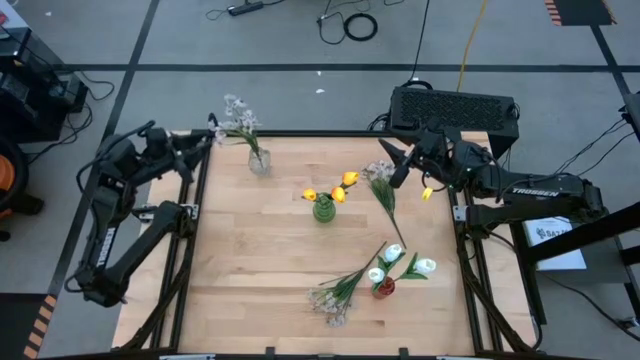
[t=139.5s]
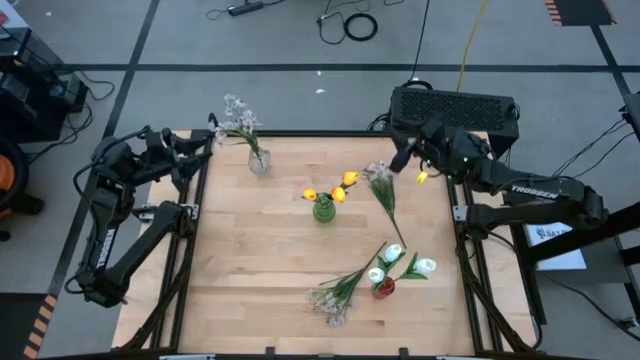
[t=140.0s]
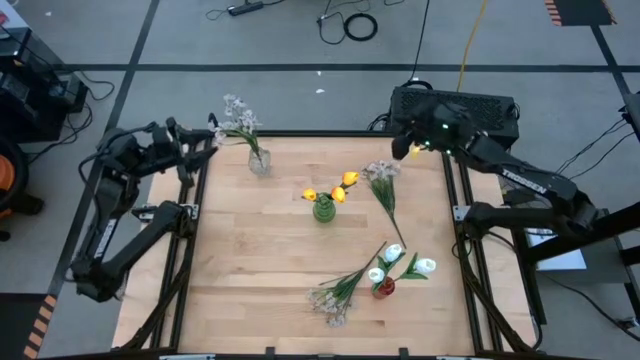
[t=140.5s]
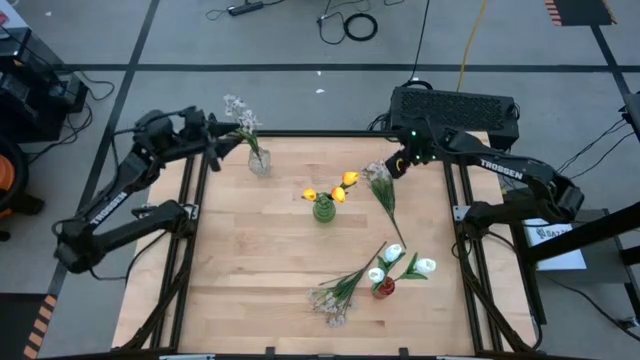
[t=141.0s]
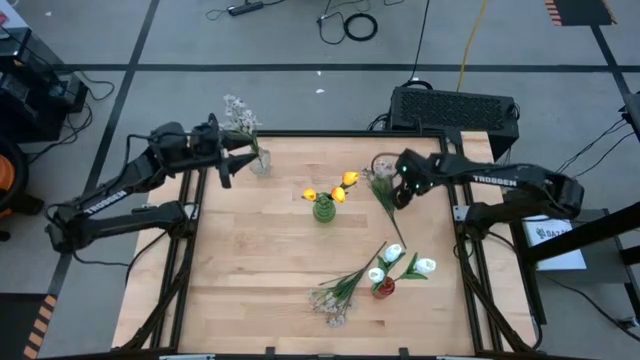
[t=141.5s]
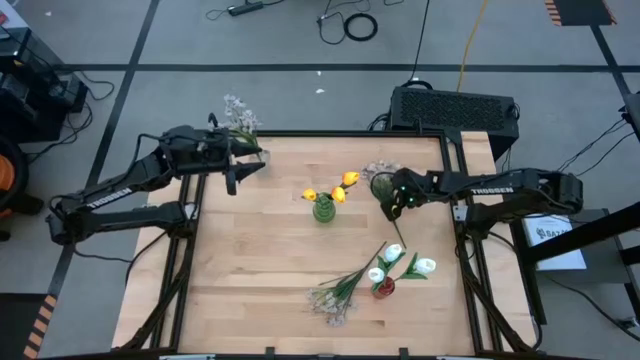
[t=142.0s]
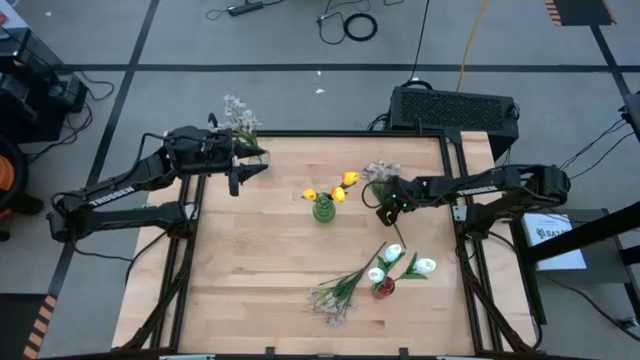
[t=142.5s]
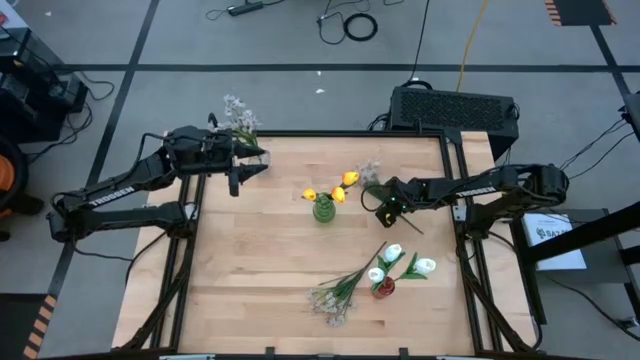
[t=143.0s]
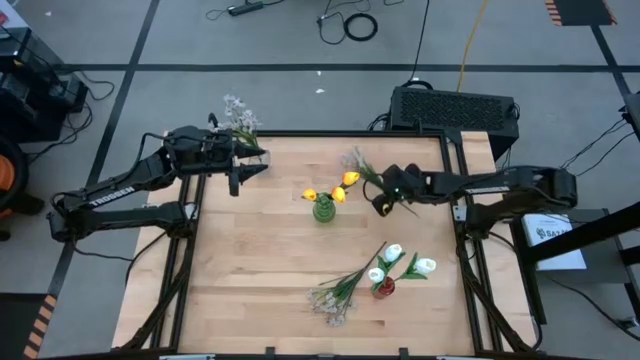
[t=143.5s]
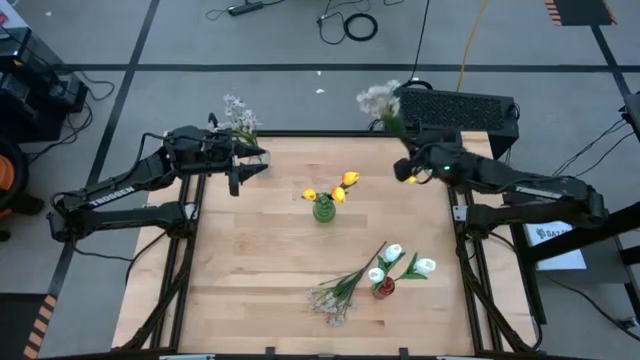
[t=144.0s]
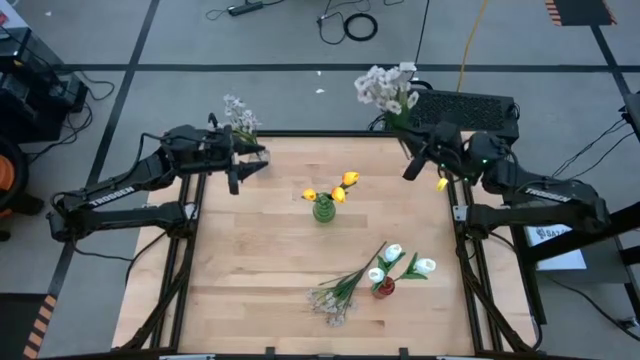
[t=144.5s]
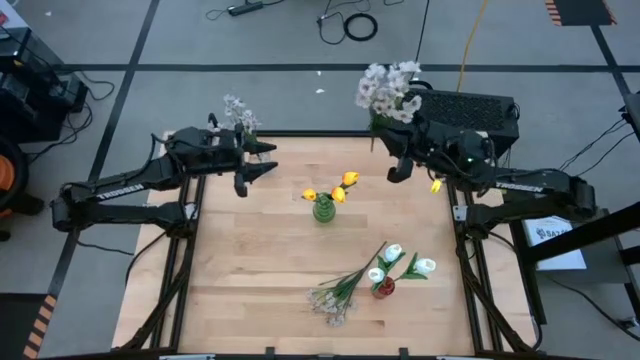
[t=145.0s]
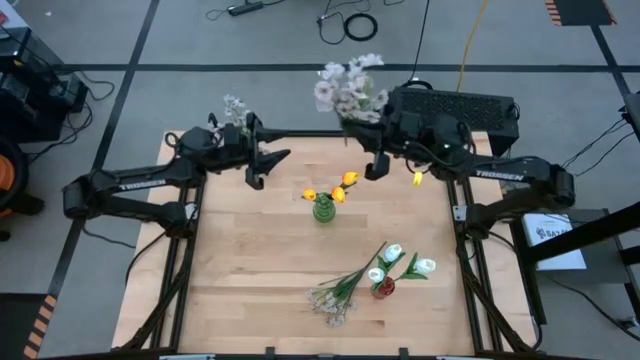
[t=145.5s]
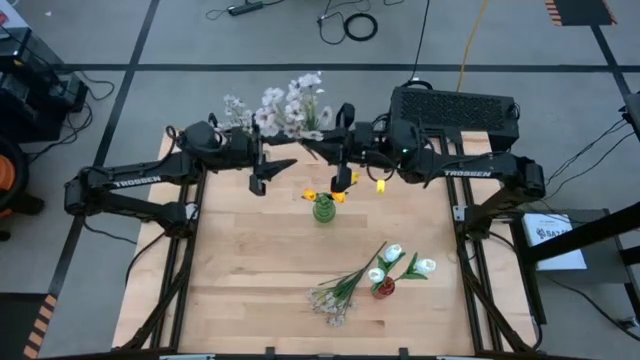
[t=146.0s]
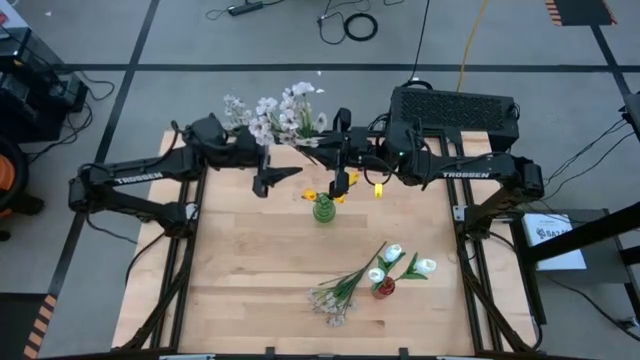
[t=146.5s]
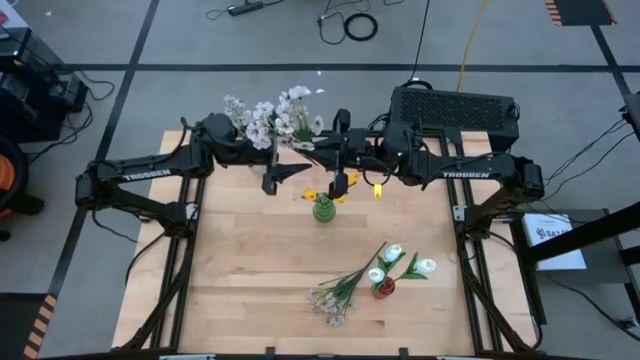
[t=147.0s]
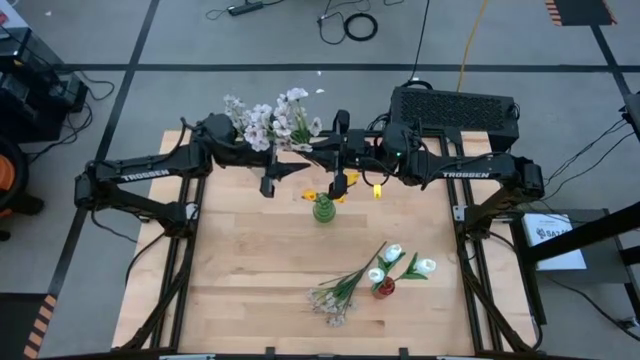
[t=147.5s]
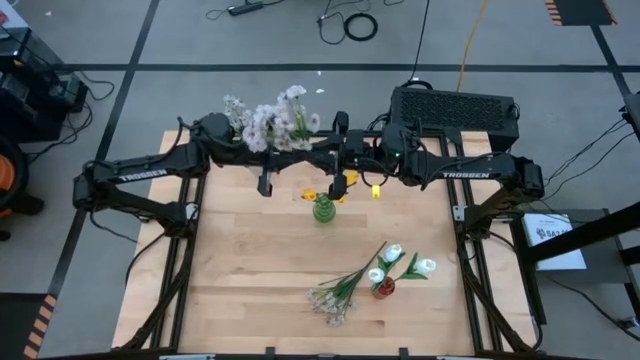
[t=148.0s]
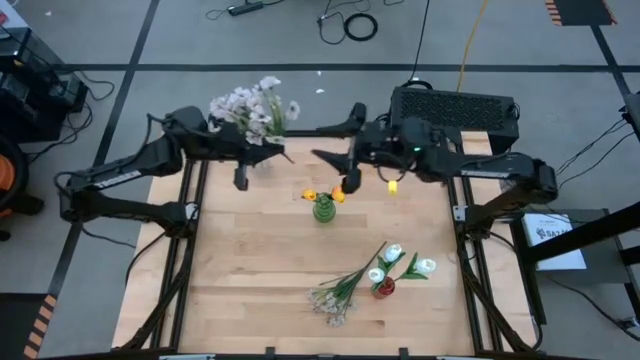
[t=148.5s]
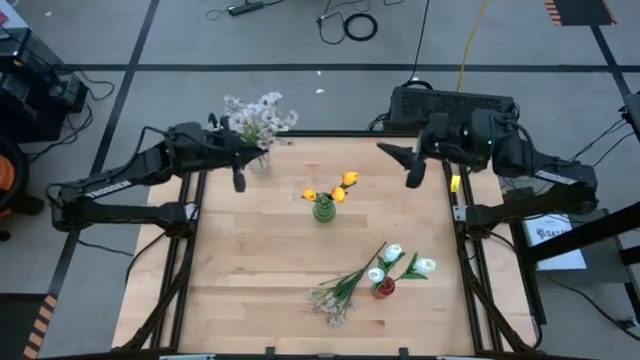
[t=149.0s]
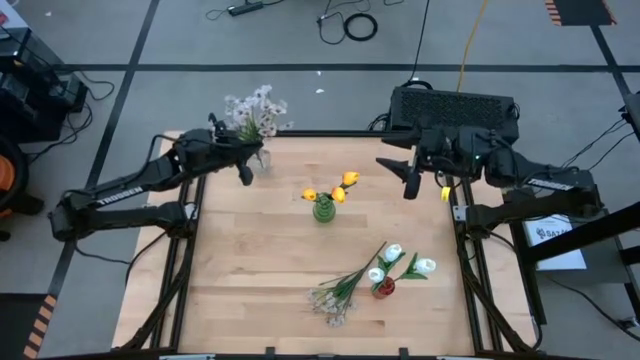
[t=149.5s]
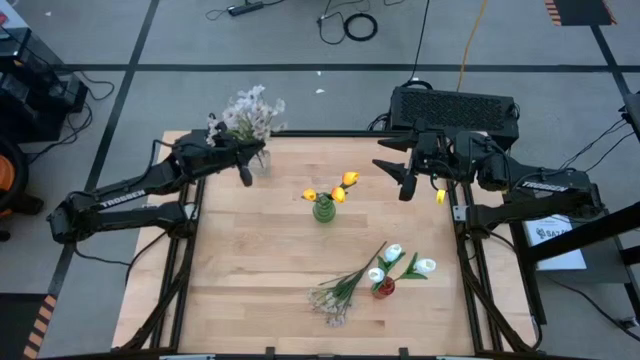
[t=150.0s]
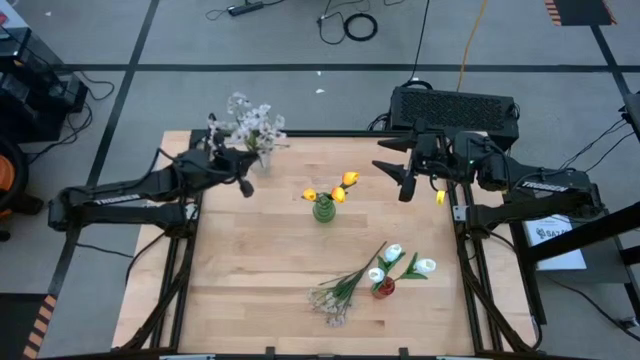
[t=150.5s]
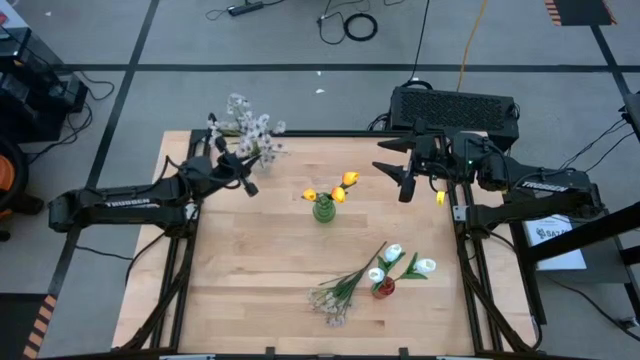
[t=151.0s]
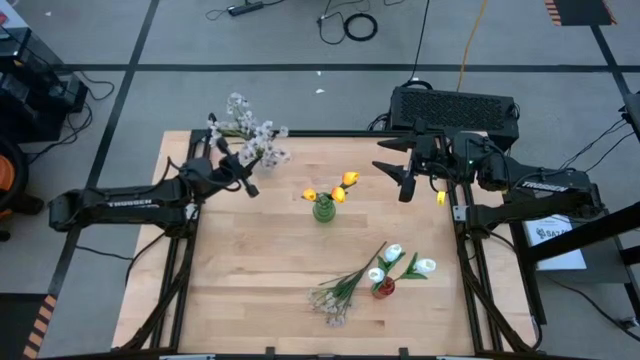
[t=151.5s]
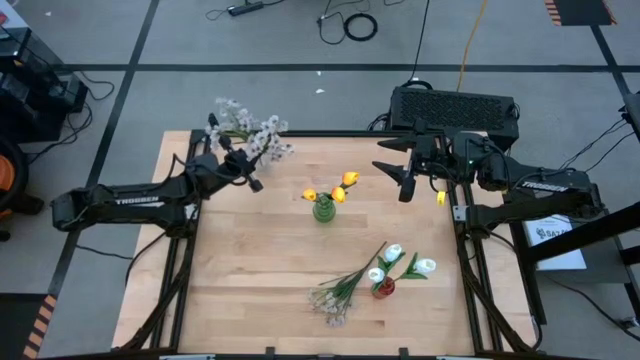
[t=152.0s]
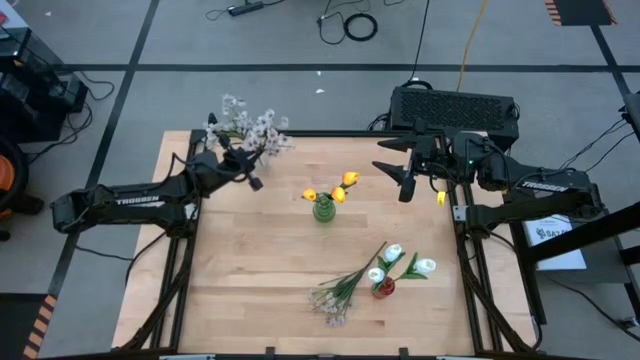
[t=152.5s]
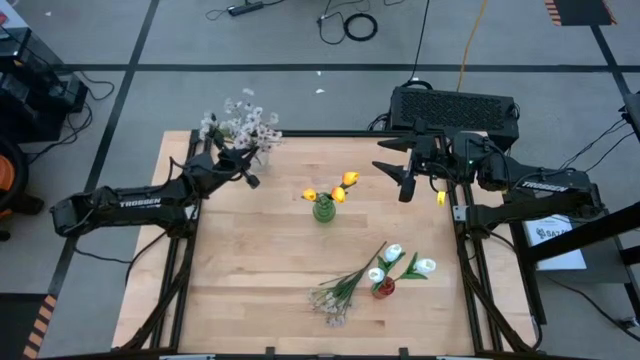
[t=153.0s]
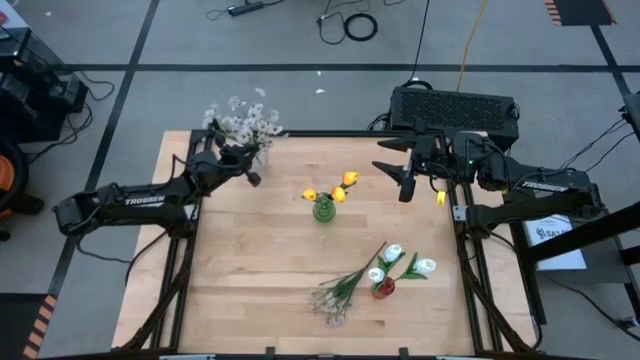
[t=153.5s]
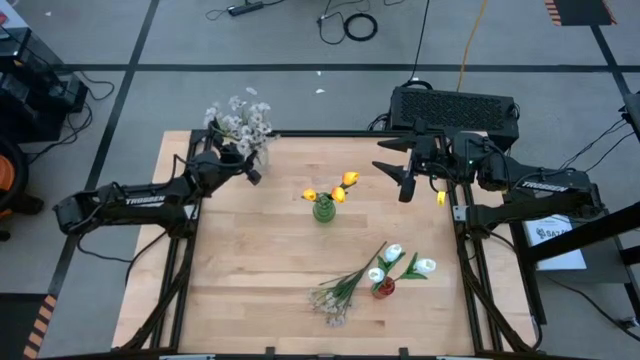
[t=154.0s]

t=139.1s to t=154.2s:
Task: Sort flowers into vase by color
Put the top white flowers into the transparent vase

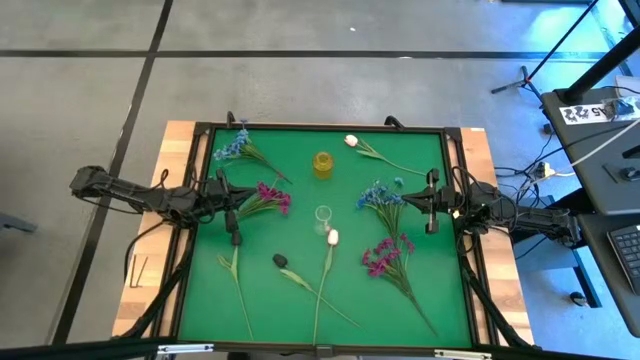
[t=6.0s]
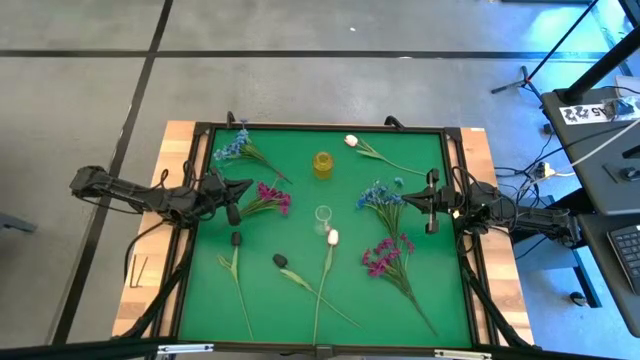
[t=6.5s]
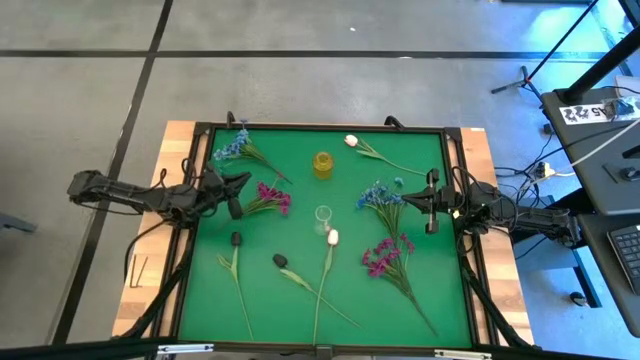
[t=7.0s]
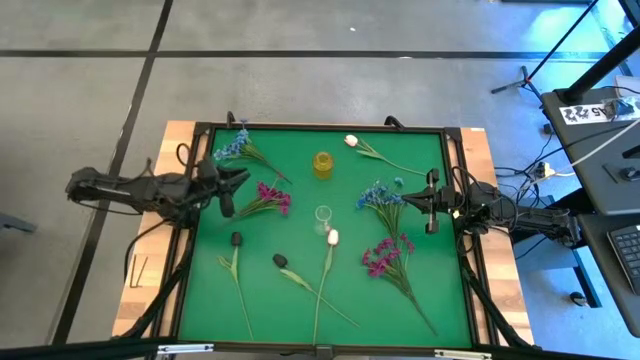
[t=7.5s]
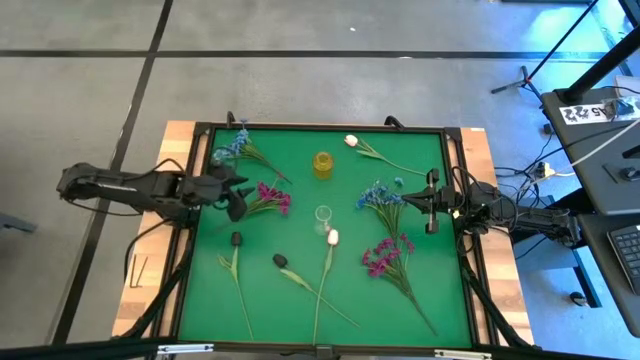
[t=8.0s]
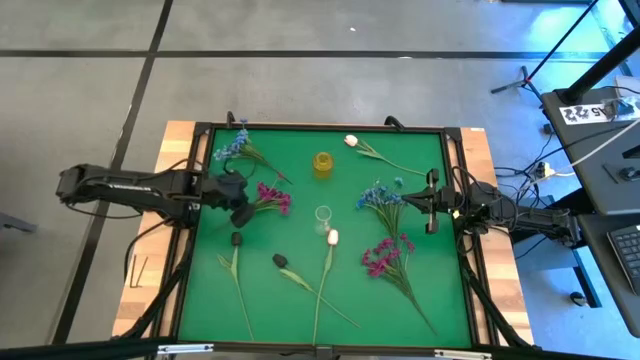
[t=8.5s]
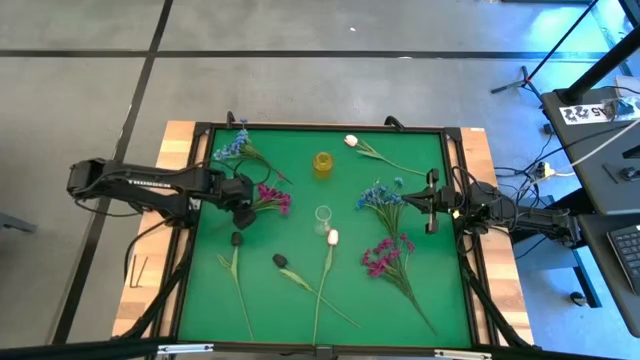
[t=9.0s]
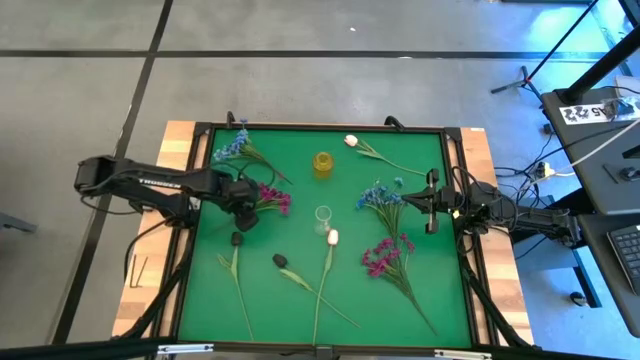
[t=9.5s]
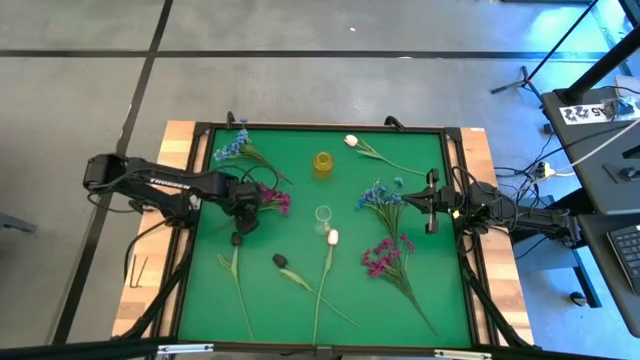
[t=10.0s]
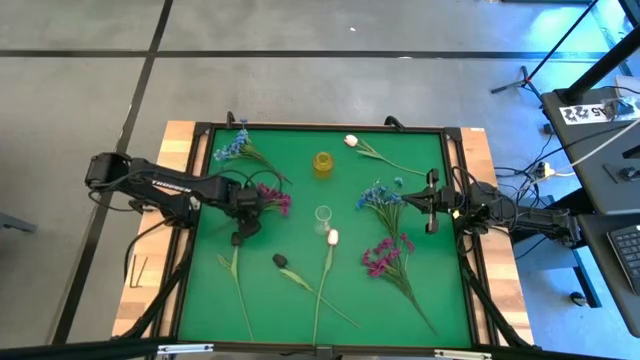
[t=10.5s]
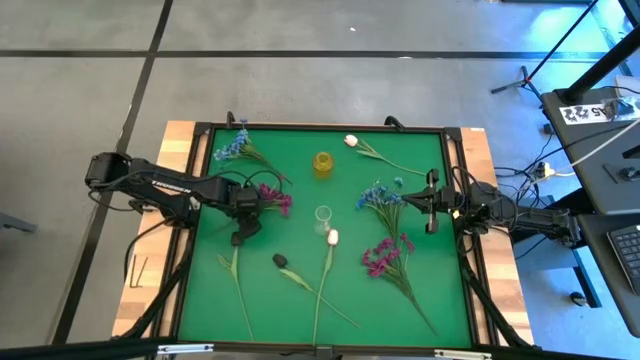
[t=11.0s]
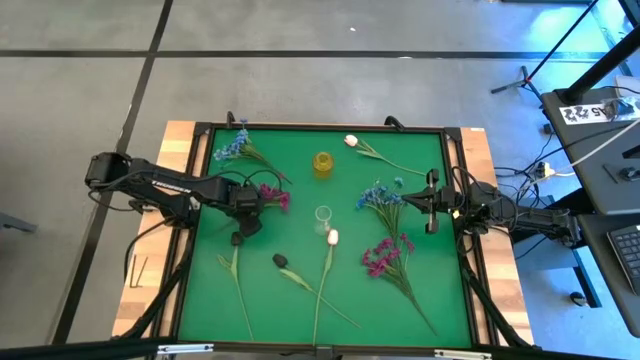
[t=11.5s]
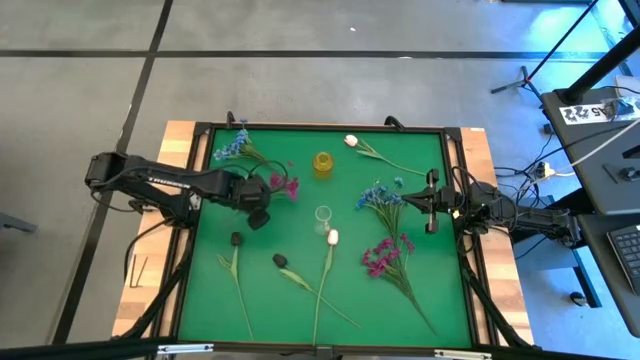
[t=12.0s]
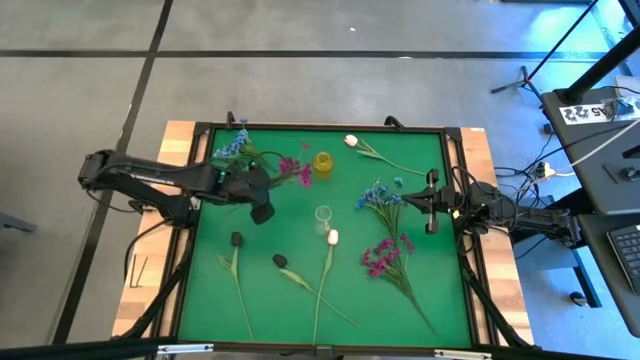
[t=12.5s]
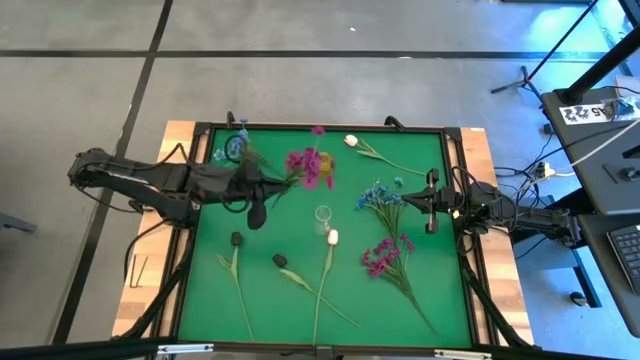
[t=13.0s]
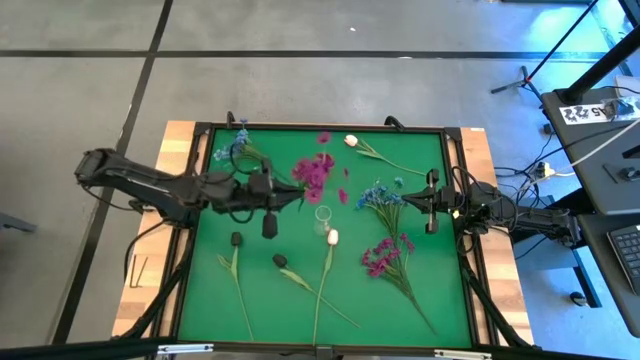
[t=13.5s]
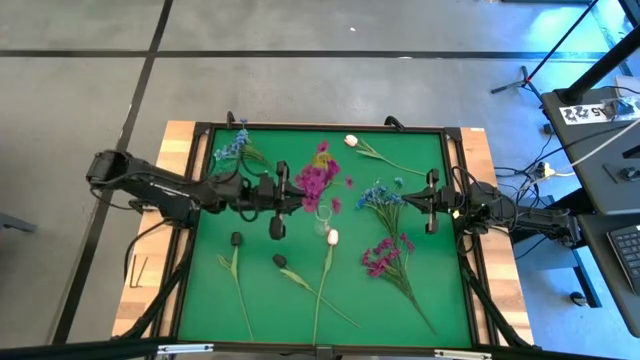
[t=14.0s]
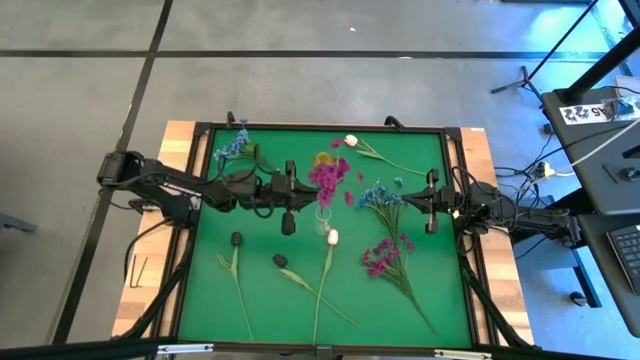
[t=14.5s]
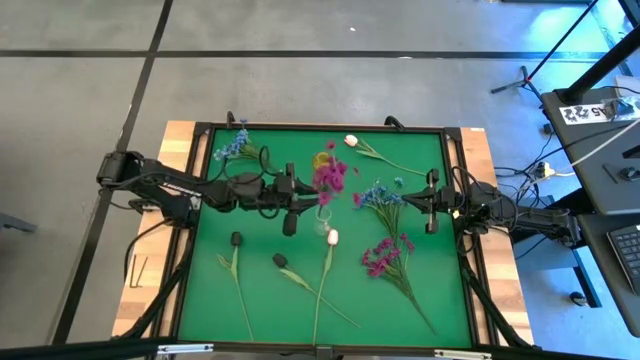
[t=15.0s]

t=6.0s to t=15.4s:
Task: Sort flowers into vase by color
Put the left purple flowers into the transparent vase
